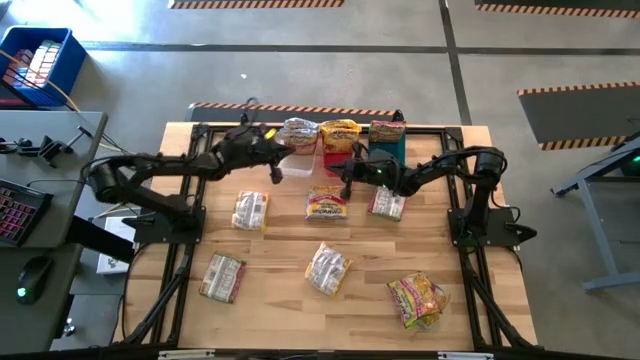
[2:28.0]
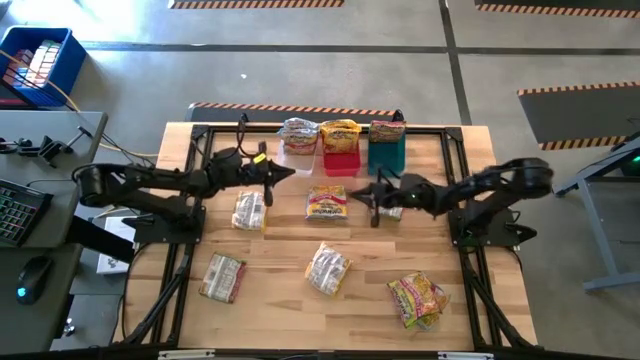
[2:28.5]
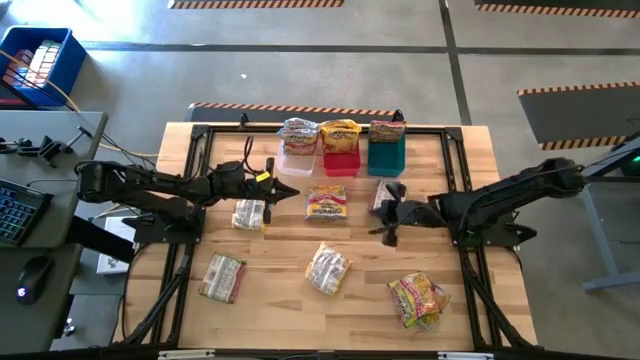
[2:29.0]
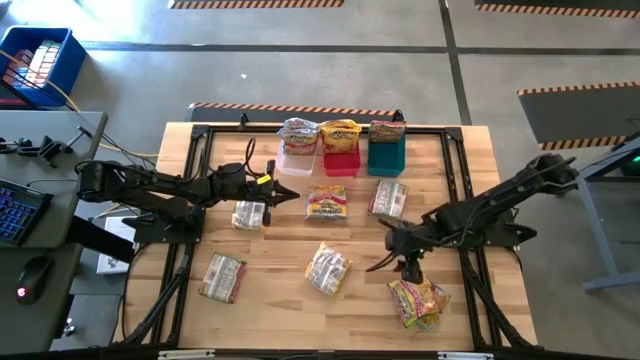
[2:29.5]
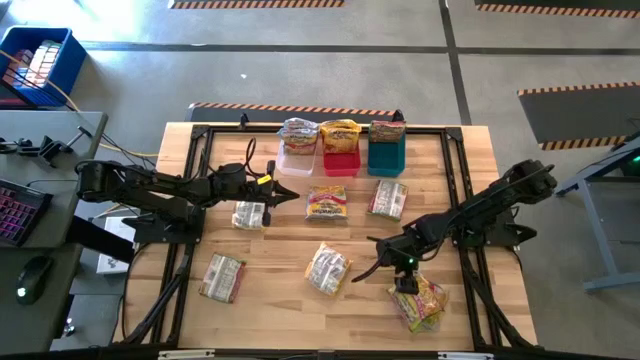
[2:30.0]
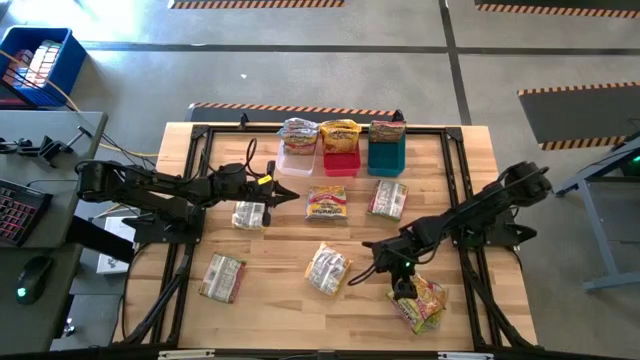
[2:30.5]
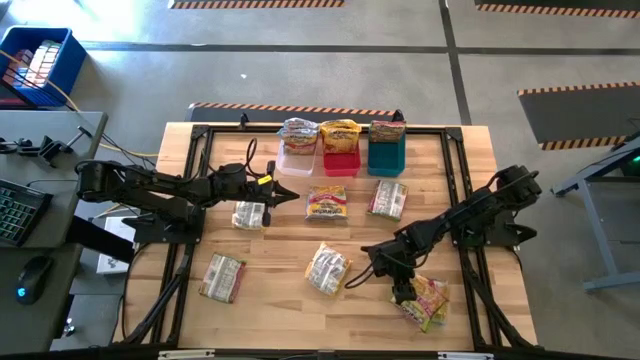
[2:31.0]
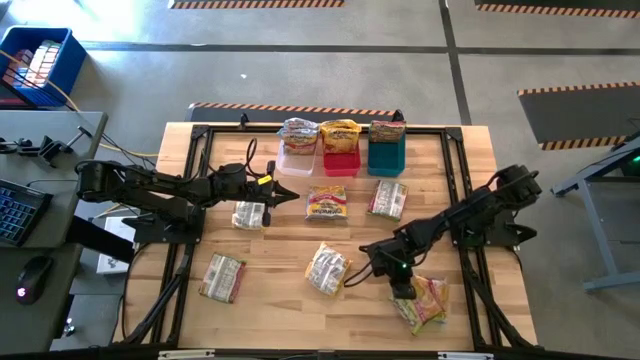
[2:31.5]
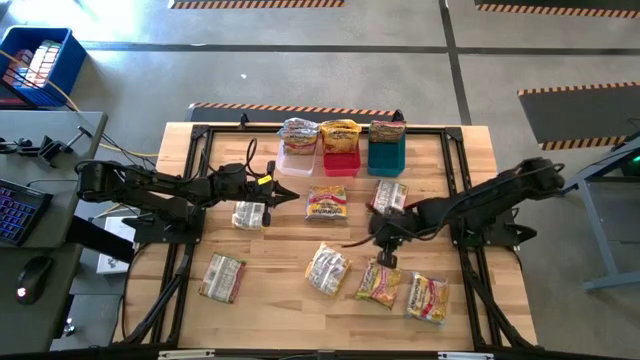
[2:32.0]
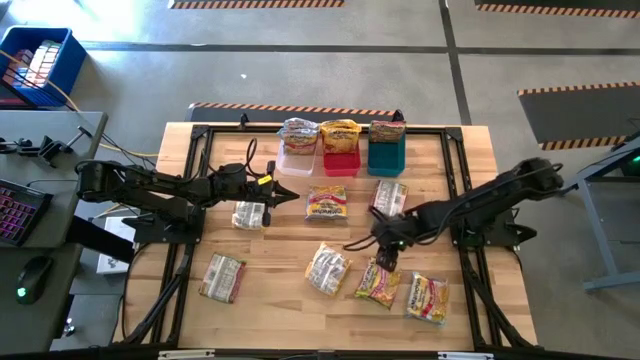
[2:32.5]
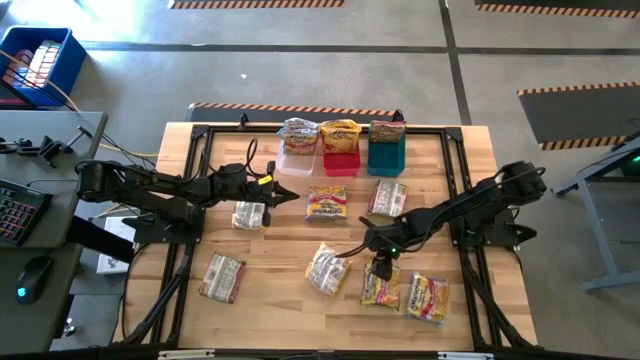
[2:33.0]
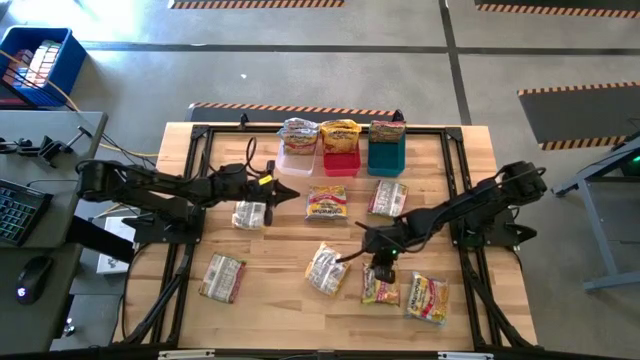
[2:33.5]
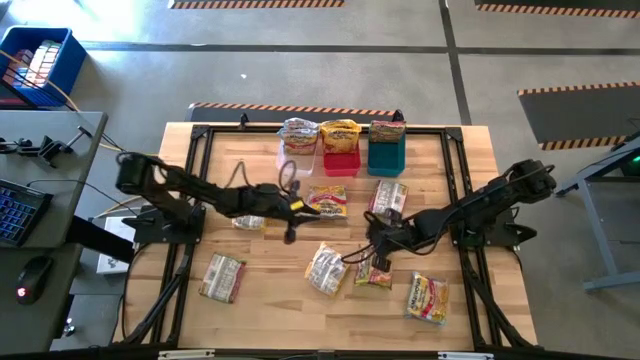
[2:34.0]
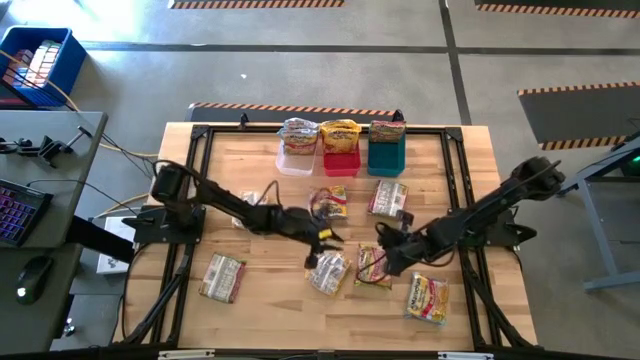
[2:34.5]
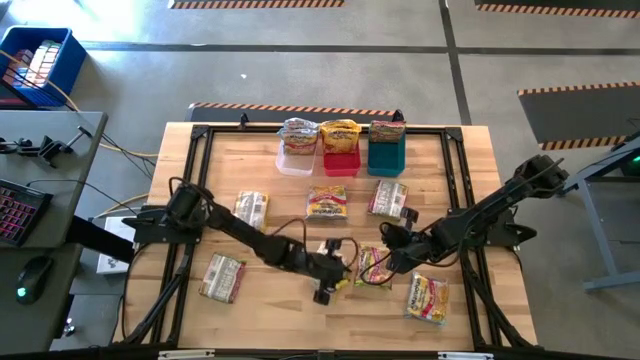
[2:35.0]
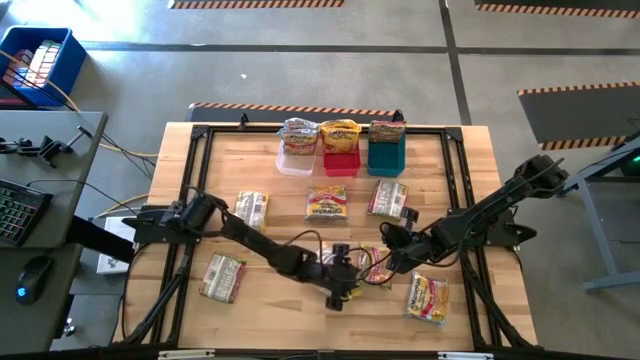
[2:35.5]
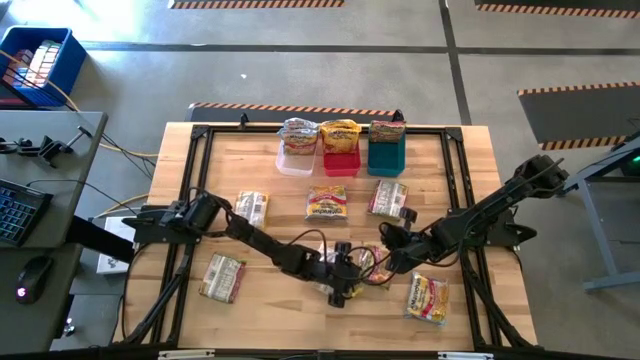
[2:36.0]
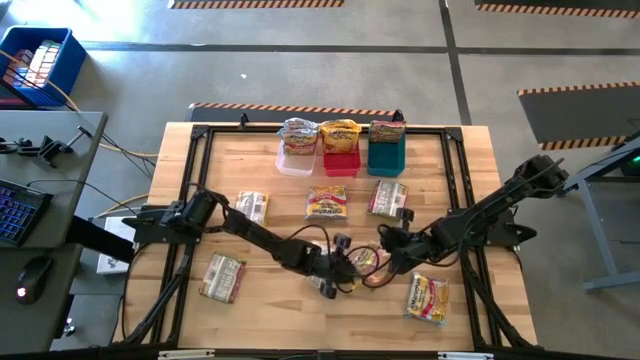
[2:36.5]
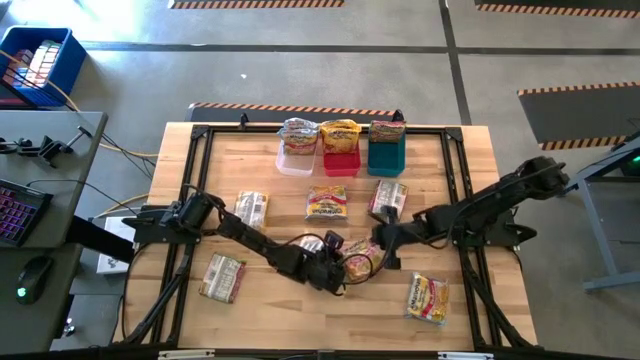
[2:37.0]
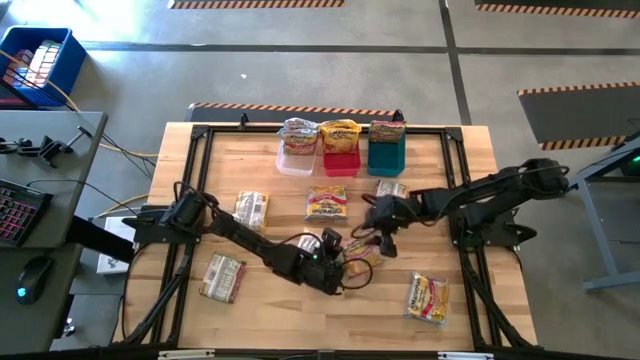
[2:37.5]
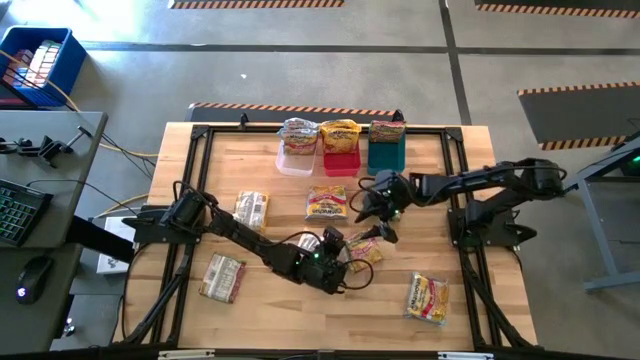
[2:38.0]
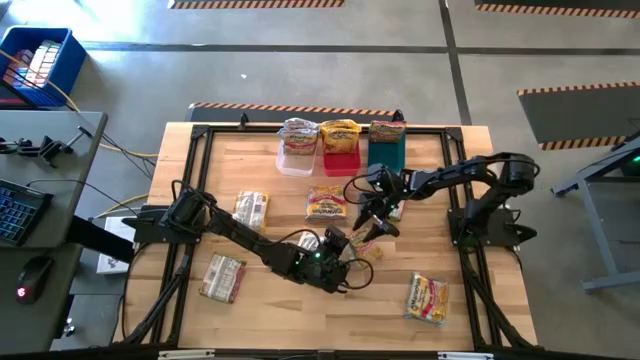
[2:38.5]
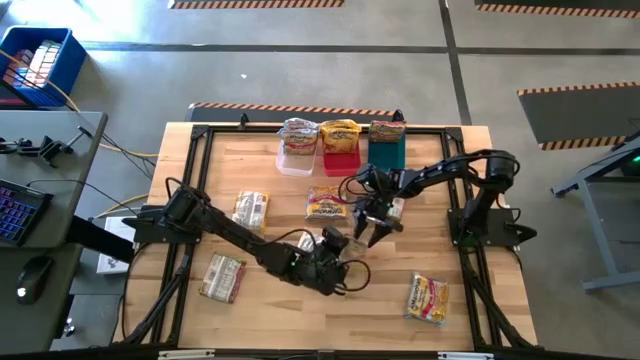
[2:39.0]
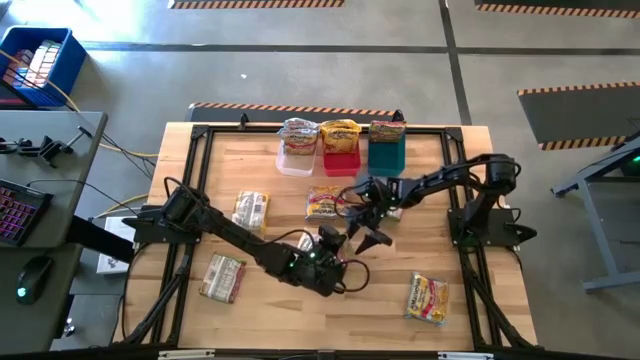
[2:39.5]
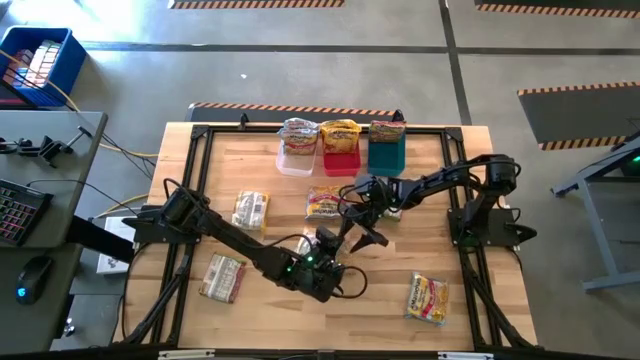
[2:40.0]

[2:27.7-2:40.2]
Task: Sort Maruchan noodles
Put the green noodle pack into the blue bin

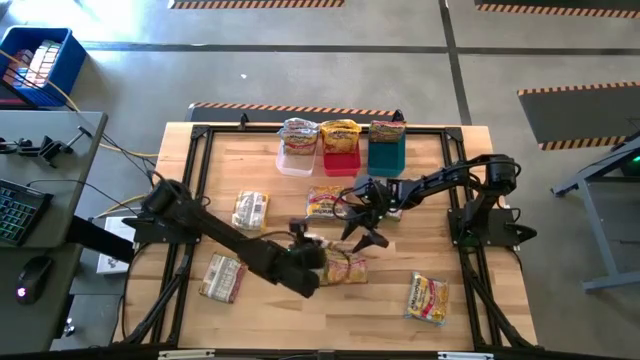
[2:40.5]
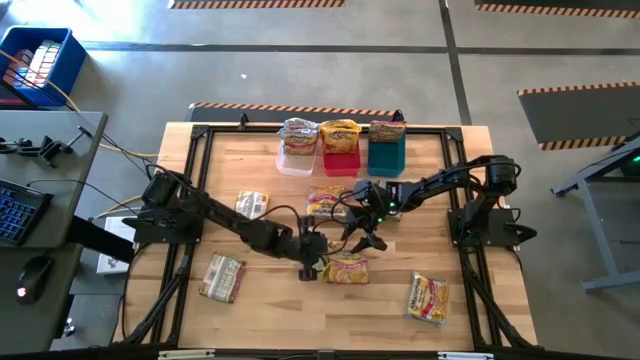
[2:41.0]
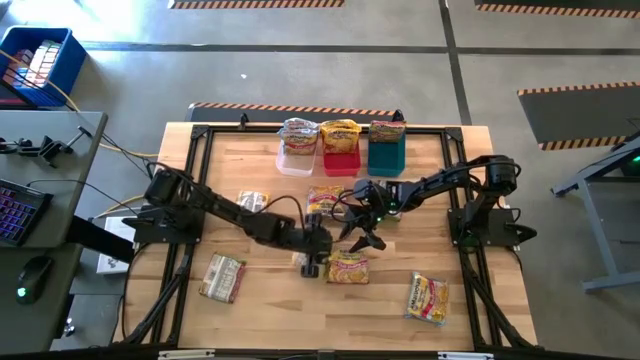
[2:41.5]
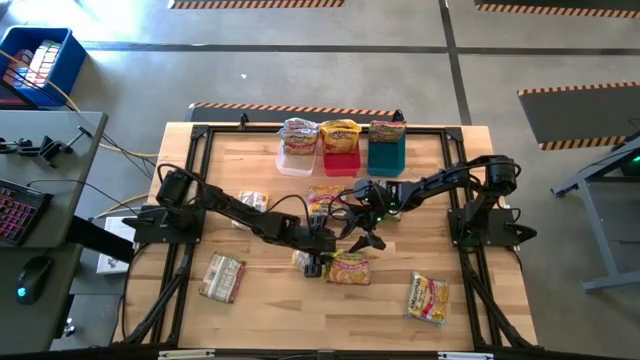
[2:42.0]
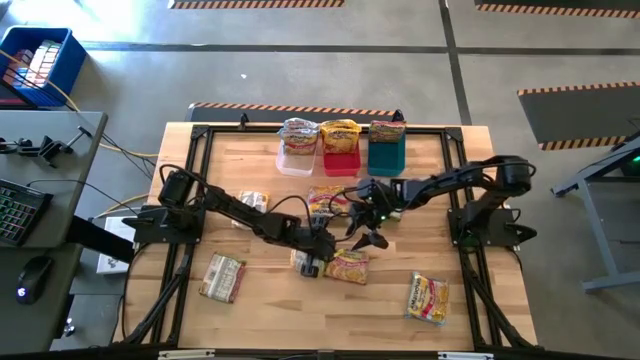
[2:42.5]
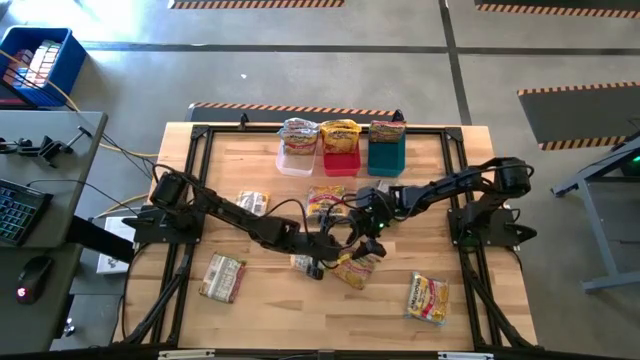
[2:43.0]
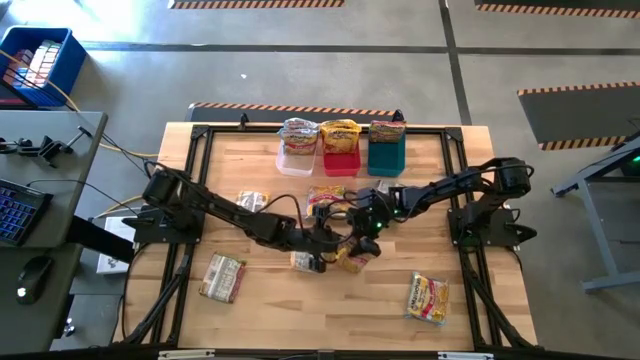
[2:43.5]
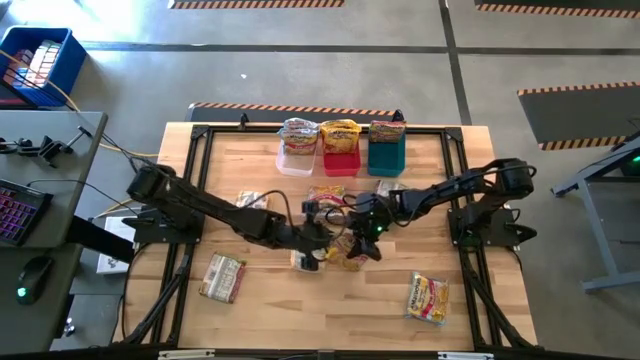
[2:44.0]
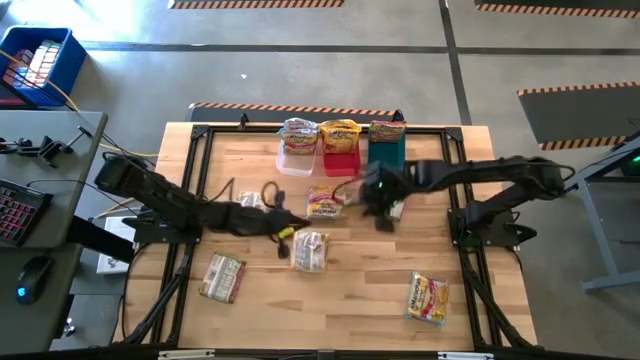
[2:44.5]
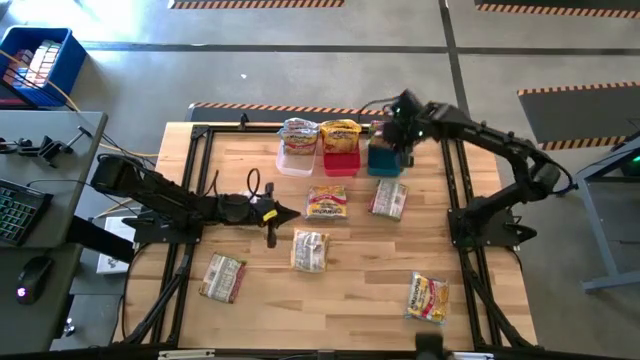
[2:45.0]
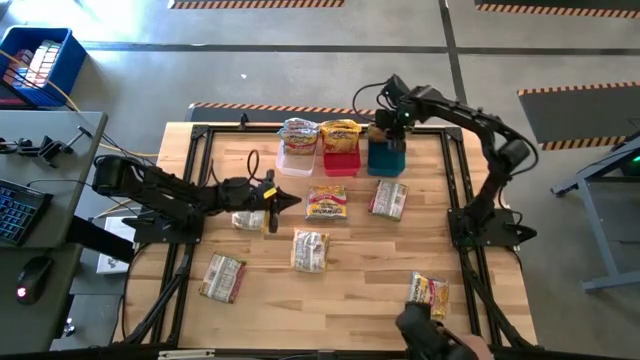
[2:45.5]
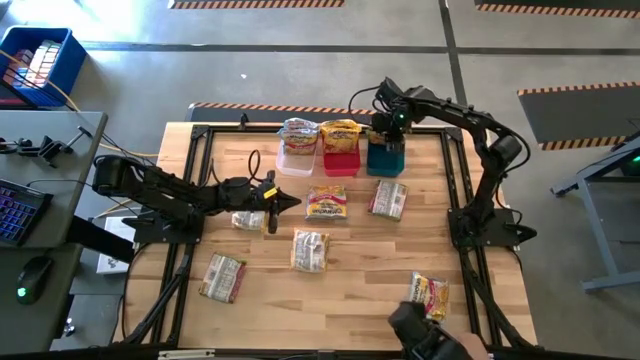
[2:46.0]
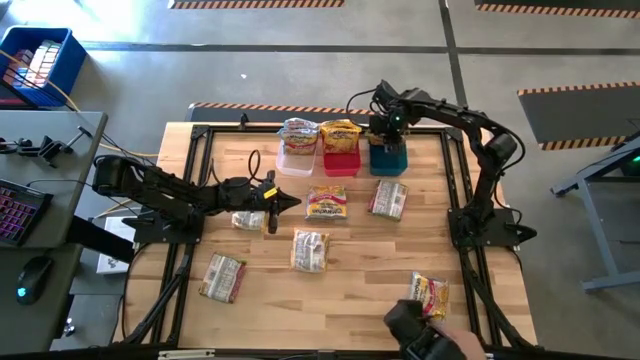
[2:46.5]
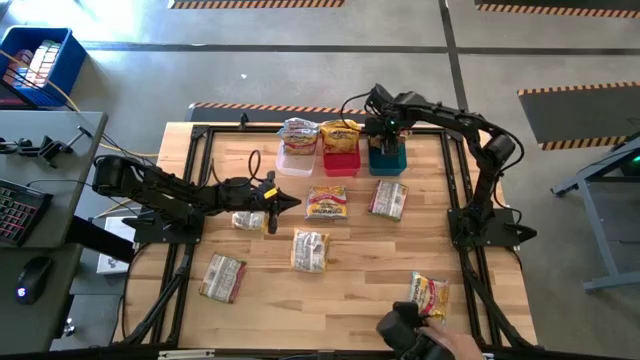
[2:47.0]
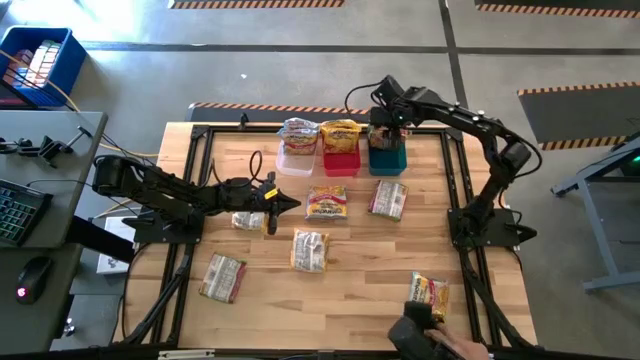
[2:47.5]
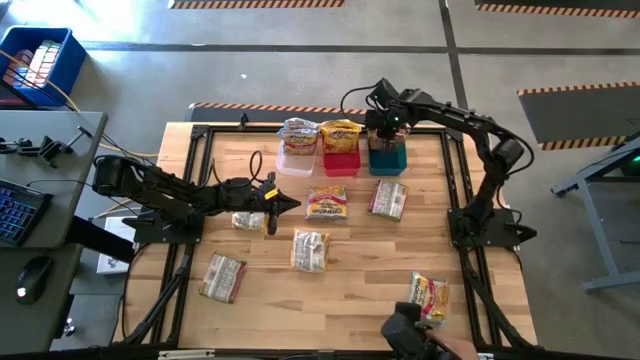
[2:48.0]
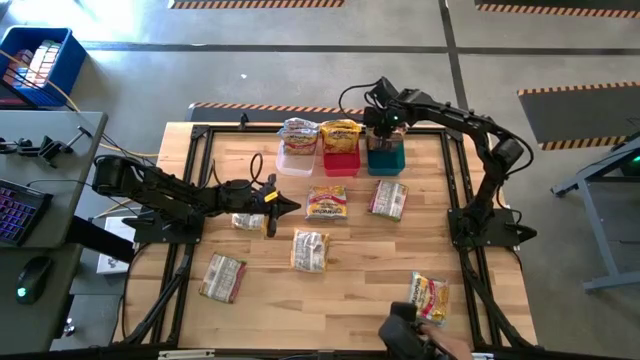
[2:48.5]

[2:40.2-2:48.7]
Put the yellow noodle pack into the blue bin

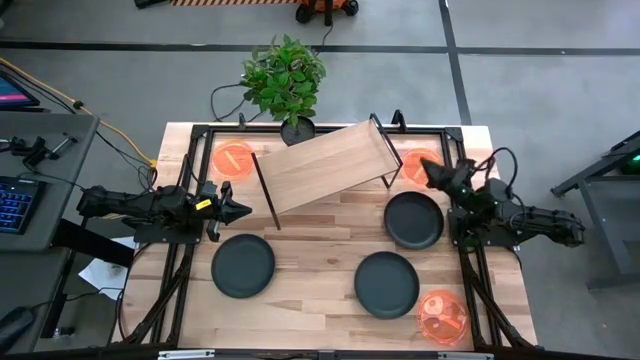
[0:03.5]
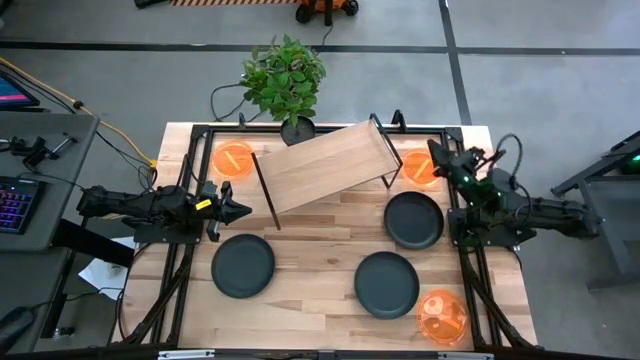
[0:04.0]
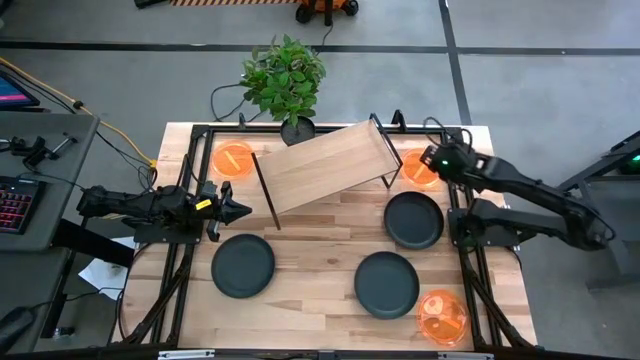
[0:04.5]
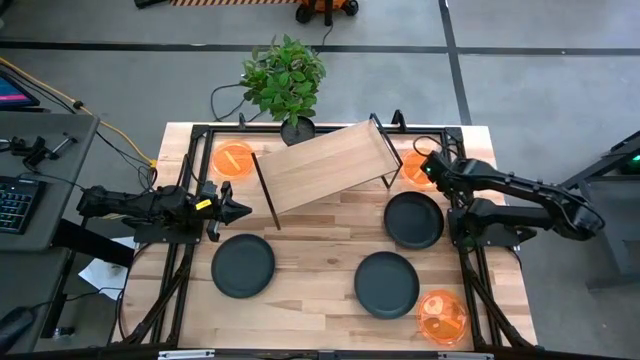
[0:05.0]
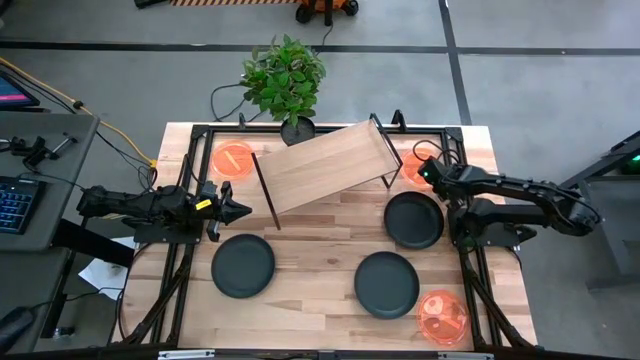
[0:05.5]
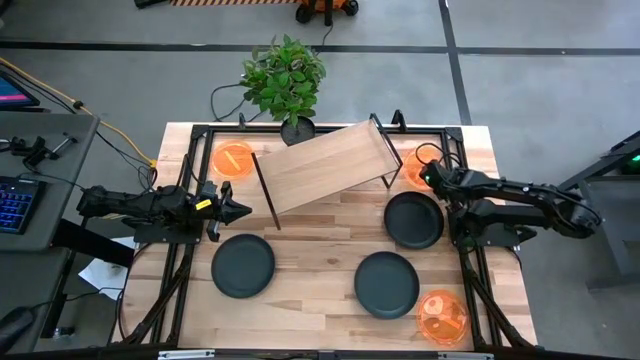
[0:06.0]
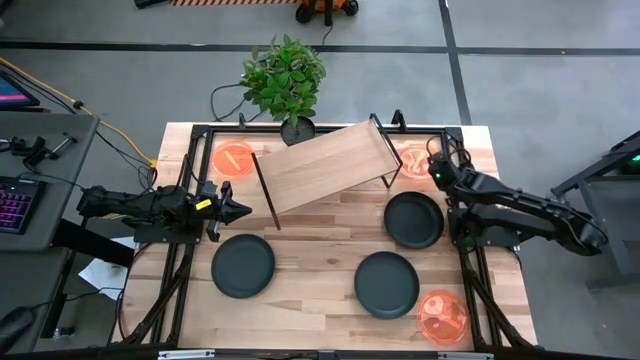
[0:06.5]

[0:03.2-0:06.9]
Task: Place and stack plates onto a shelf
Put the top right orange plate on the shelf
